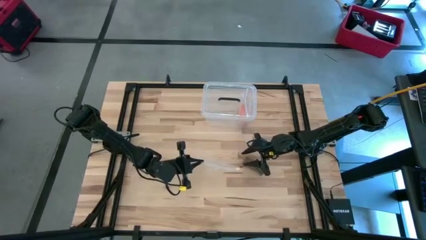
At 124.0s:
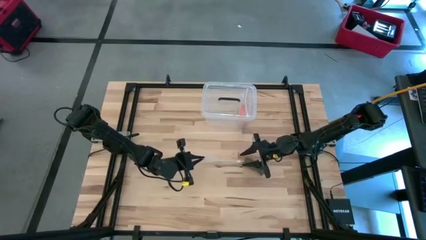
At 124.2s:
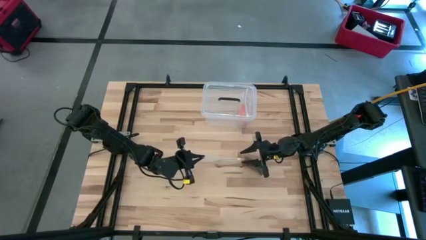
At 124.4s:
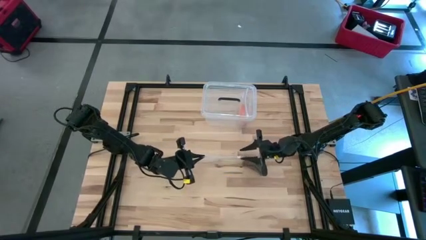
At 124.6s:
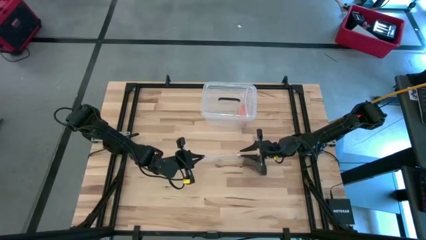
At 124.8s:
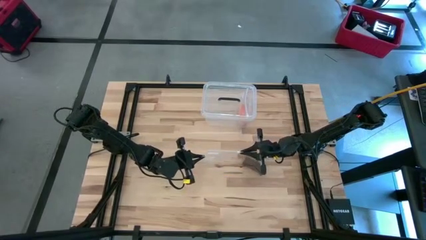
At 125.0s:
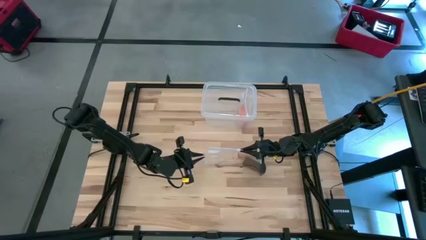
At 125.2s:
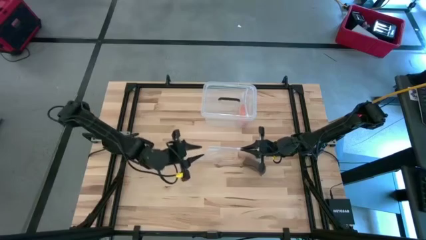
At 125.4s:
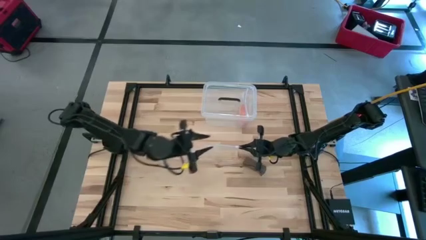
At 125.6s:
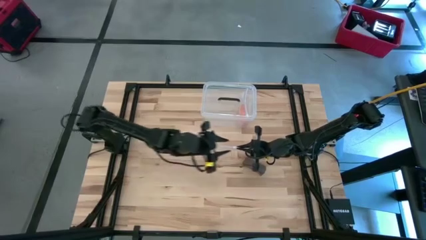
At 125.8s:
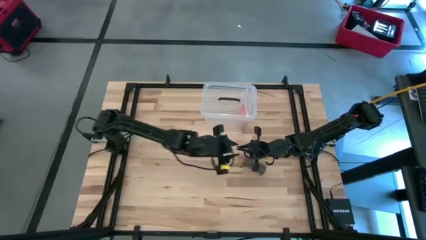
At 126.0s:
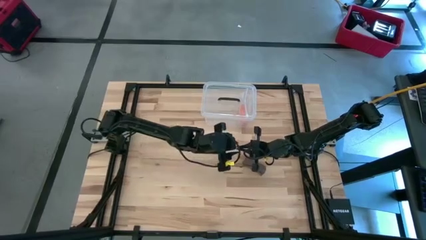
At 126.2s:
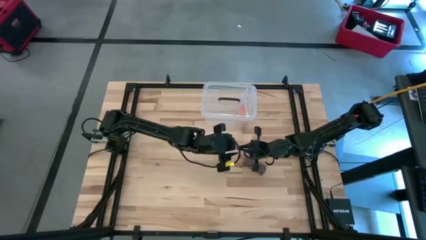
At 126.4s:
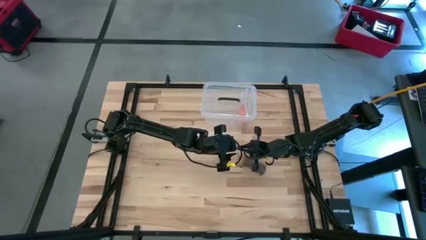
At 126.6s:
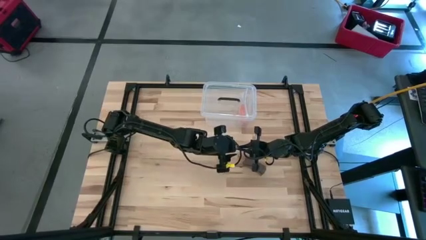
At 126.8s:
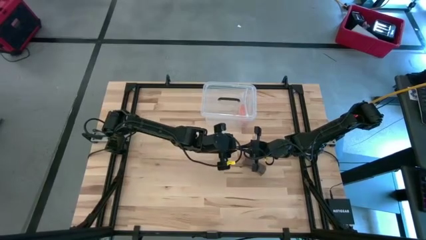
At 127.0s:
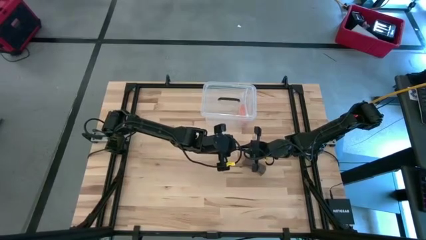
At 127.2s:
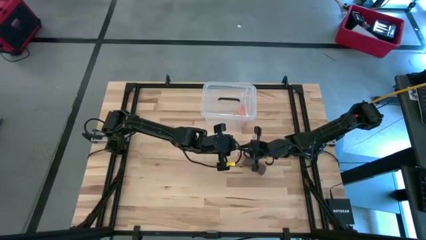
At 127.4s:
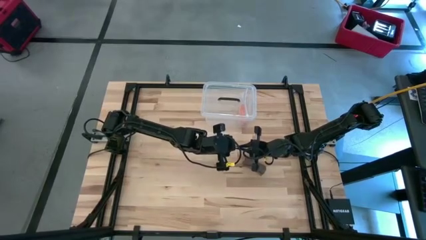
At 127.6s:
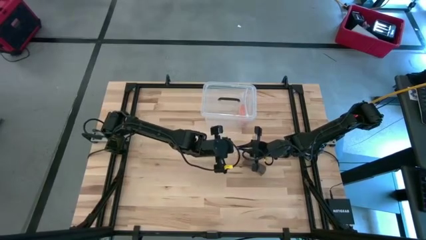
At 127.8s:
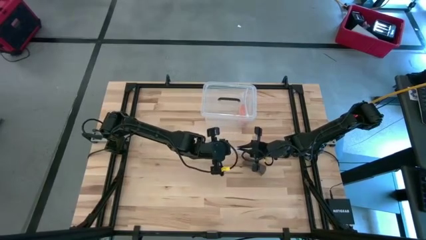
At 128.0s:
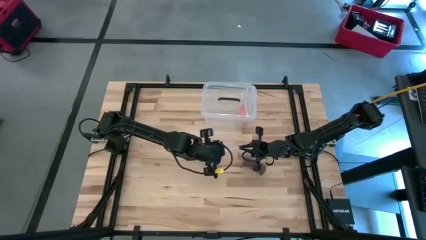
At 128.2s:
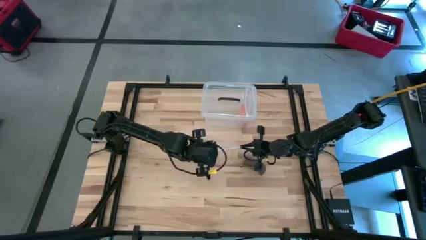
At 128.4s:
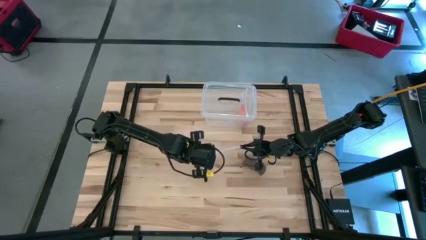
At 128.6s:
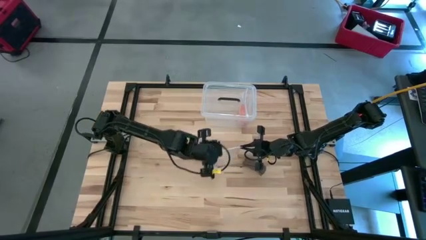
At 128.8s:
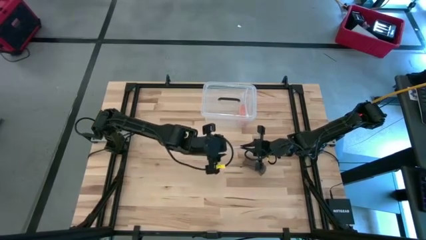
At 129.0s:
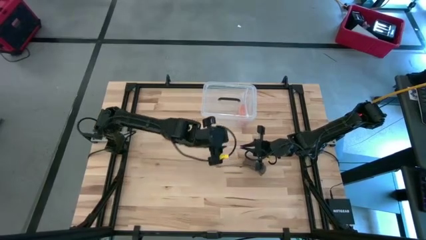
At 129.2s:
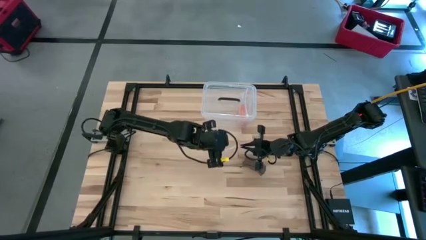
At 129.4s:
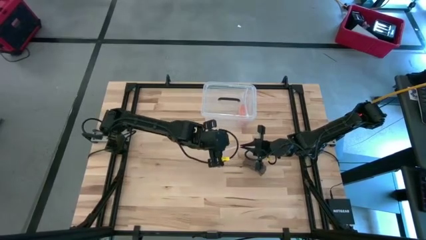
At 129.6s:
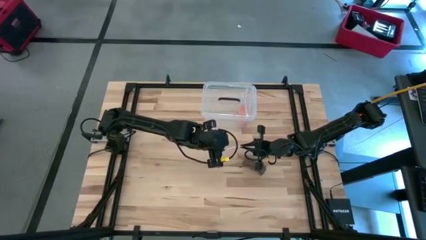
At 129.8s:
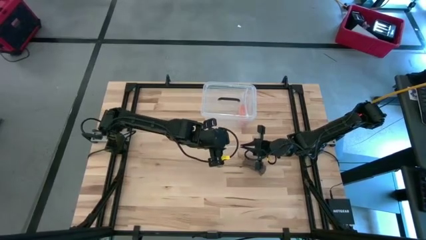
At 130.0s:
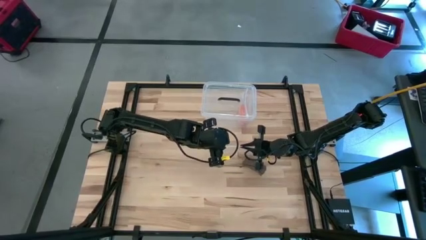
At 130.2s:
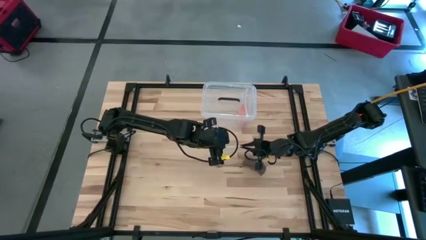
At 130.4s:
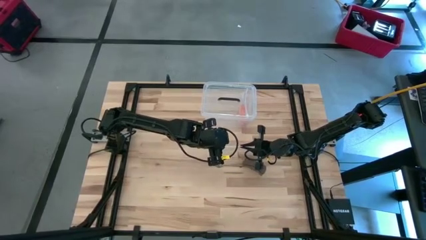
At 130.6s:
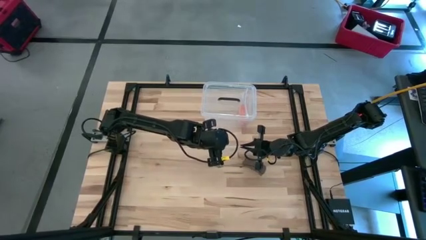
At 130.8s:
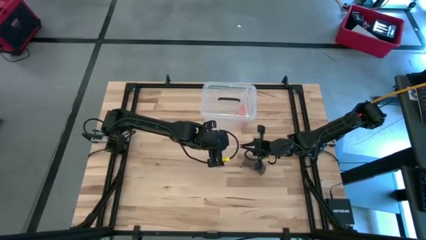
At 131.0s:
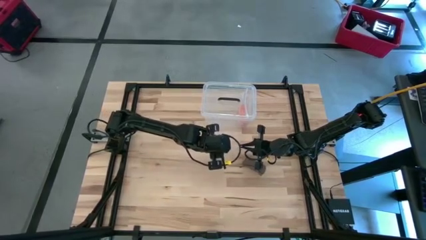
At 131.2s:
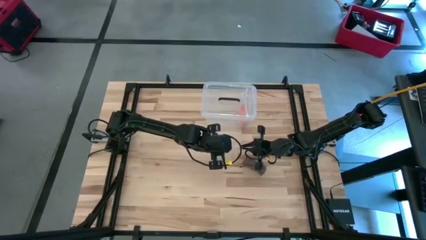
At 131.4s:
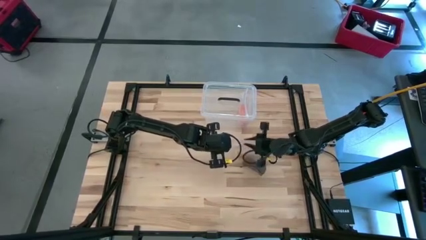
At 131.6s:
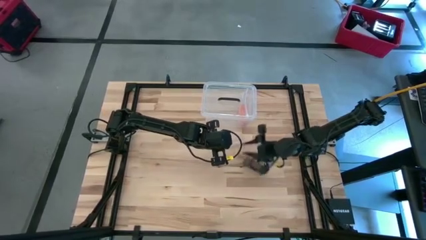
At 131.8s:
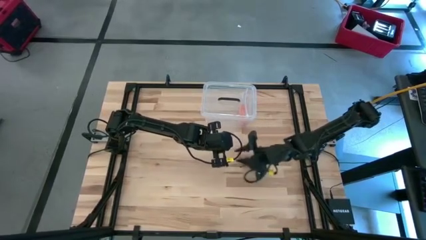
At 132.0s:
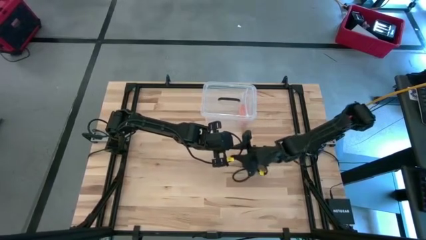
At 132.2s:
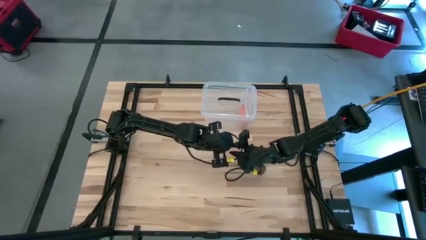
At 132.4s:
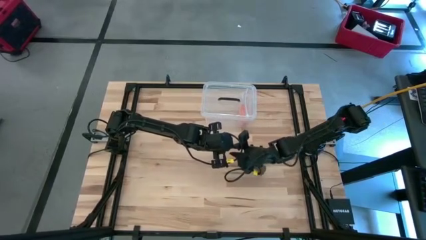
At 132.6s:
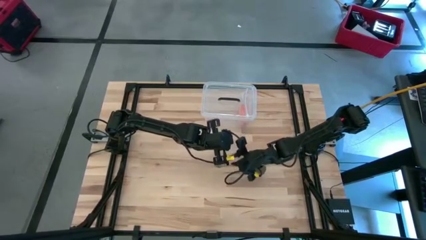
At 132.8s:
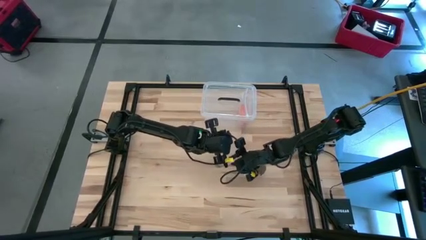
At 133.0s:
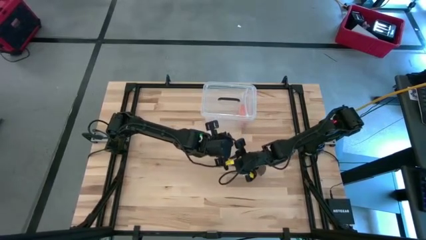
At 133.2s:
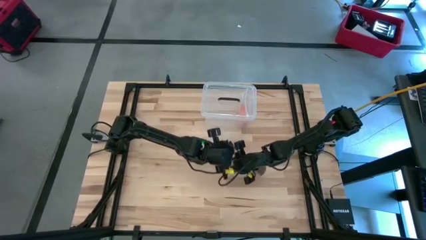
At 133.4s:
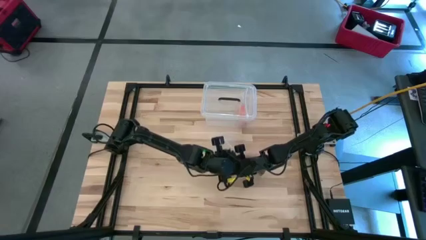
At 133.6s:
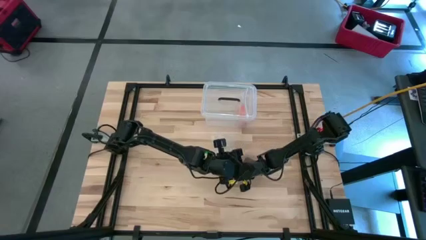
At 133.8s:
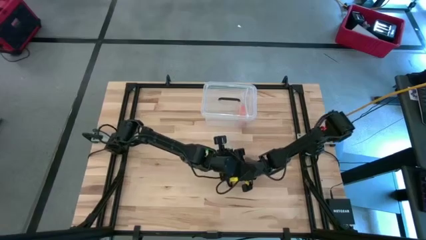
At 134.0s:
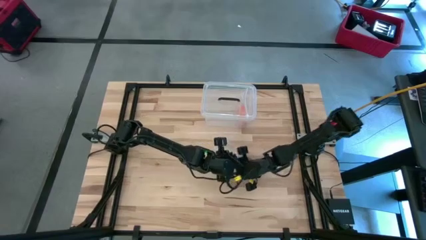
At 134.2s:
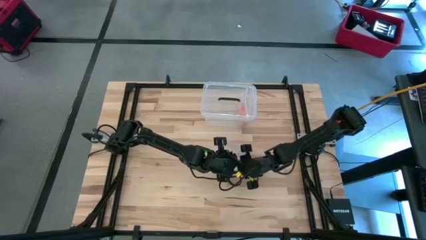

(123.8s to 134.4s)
Task: Roll bandage
Open the transparent zip bag

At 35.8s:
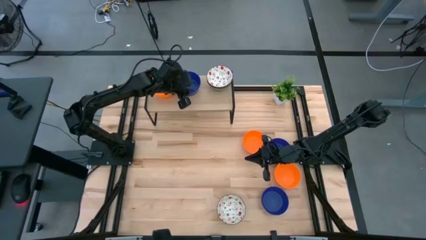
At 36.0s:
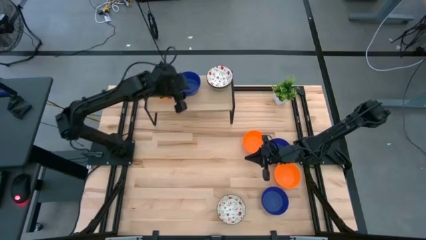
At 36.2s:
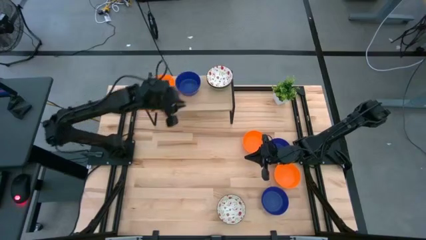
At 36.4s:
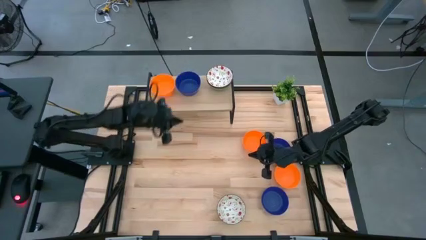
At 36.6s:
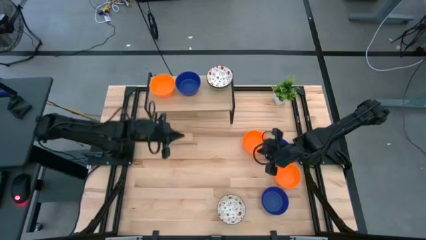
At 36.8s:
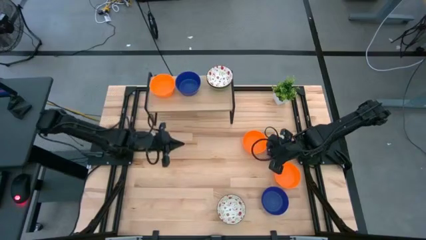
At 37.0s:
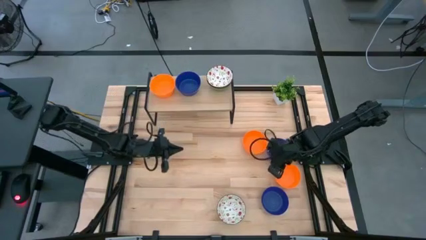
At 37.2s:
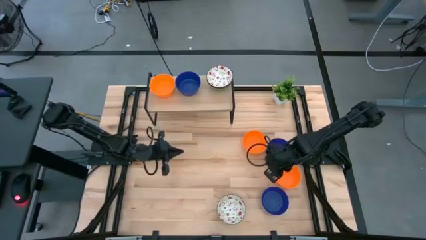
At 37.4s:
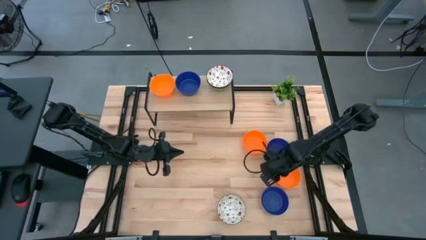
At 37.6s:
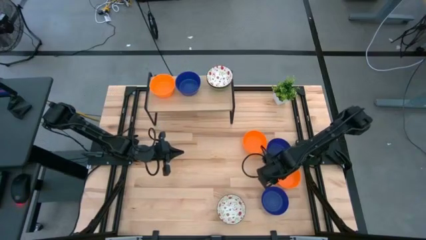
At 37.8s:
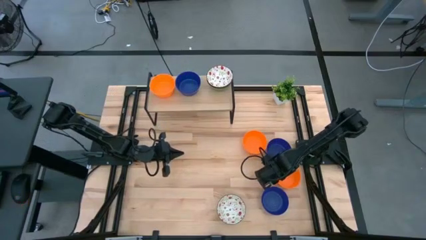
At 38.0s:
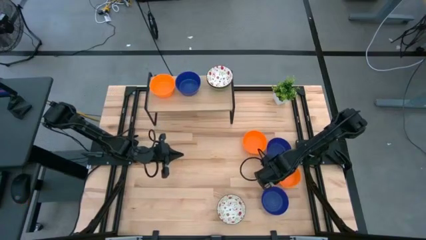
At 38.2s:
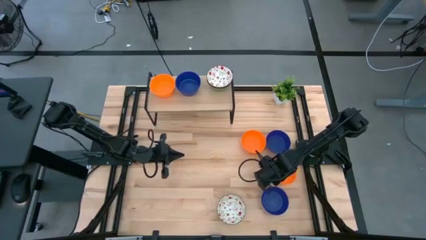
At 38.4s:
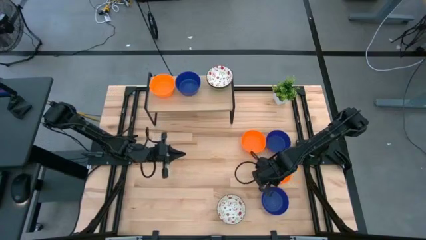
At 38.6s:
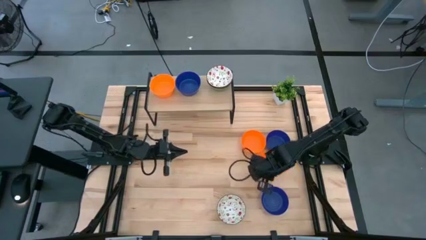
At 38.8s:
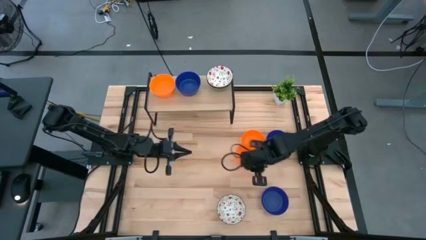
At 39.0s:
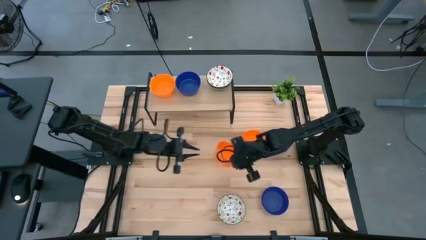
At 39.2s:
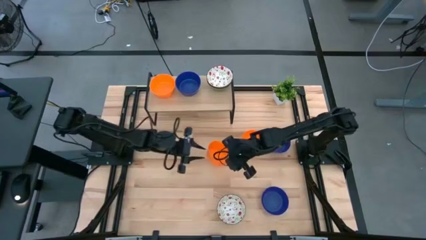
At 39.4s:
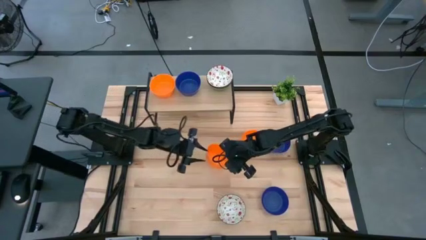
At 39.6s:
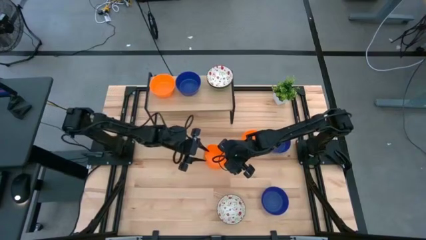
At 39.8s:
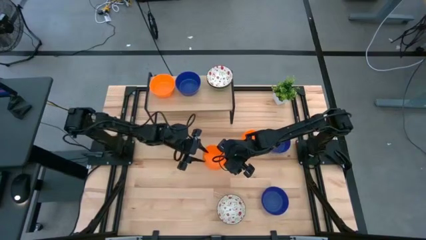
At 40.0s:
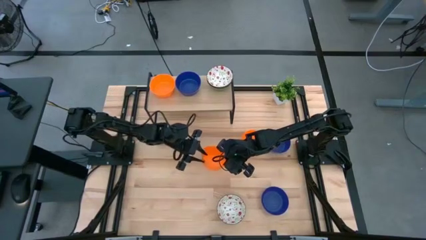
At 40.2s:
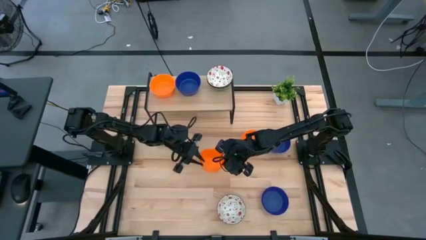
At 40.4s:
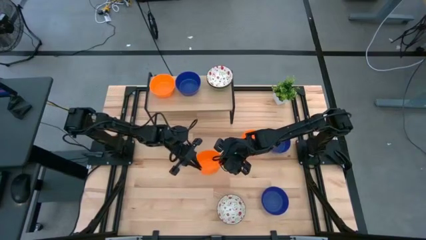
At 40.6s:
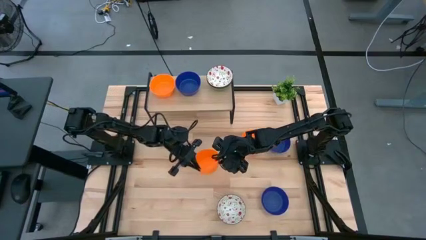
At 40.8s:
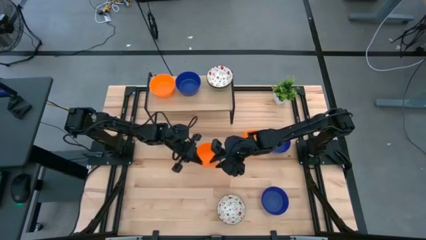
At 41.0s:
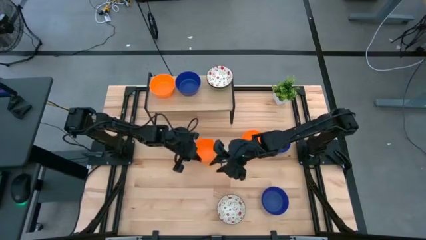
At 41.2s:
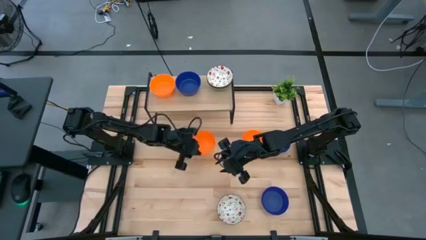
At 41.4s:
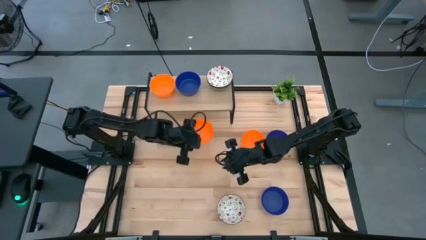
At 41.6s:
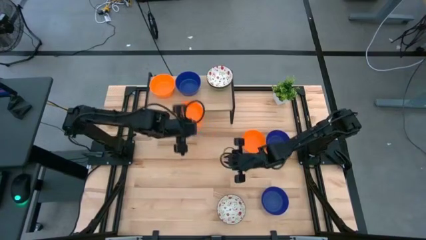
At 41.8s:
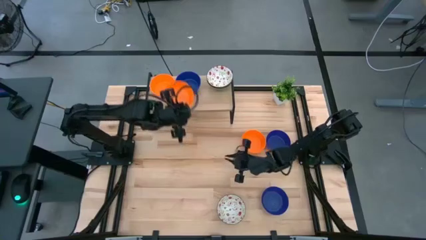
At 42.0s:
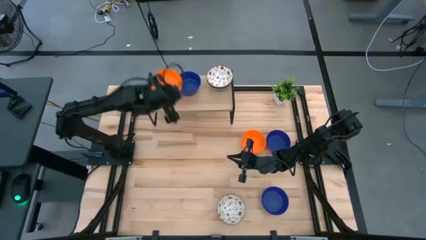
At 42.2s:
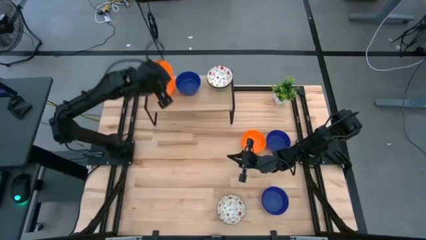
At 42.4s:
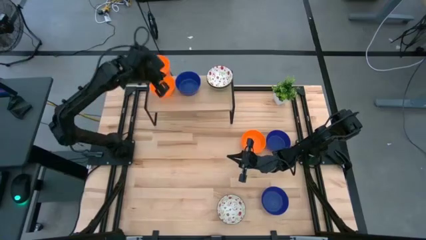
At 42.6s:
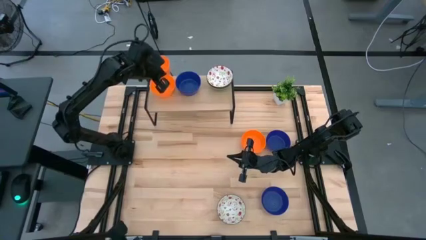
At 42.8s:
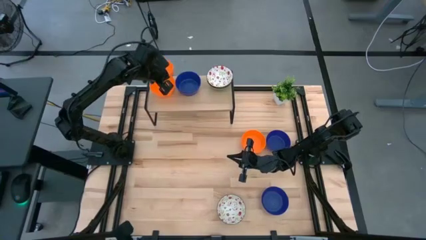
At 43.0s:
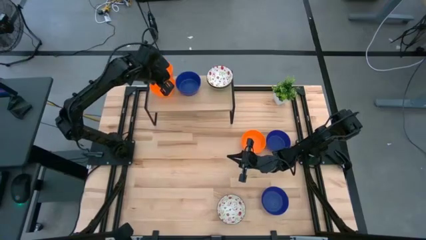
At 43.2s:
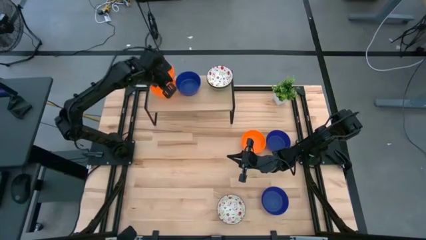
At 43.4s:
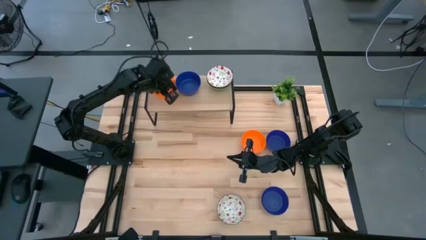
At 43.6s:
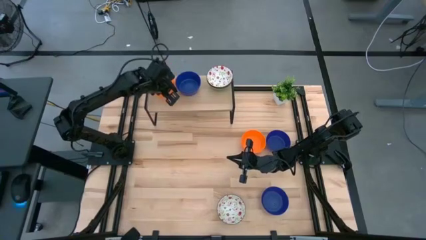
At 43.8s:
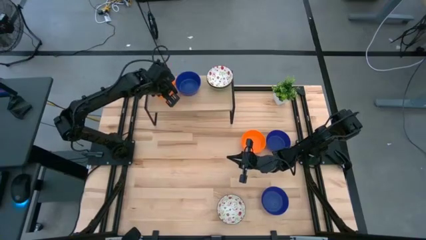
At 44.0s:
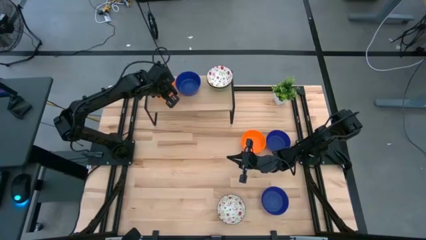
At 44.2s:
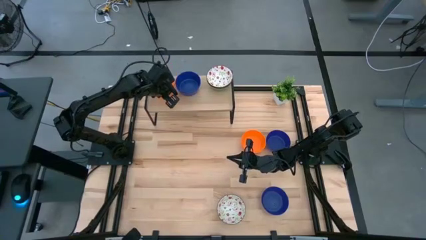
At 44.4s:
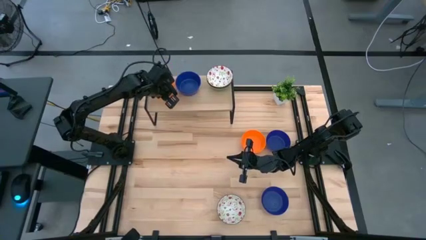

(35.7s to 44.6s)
Task: Pick & Place Mini bowls
Stack the bottom orange bowl on top of the other orange bowl on the shelf
